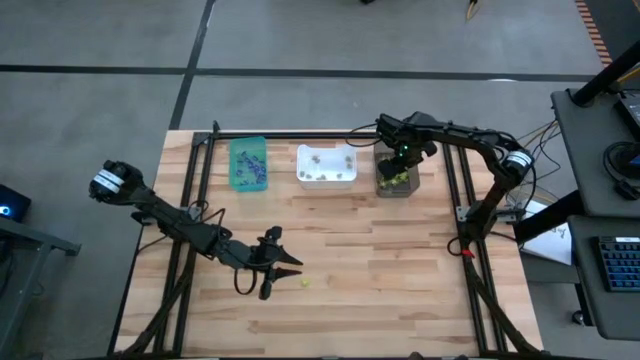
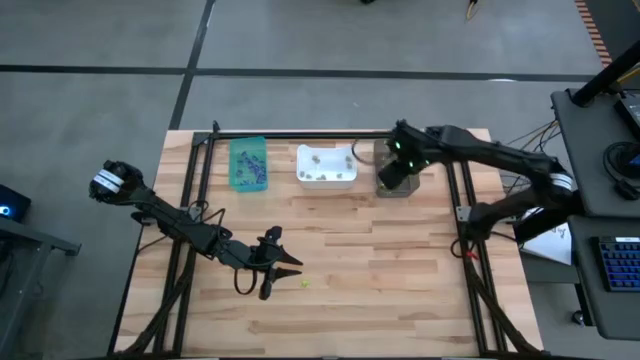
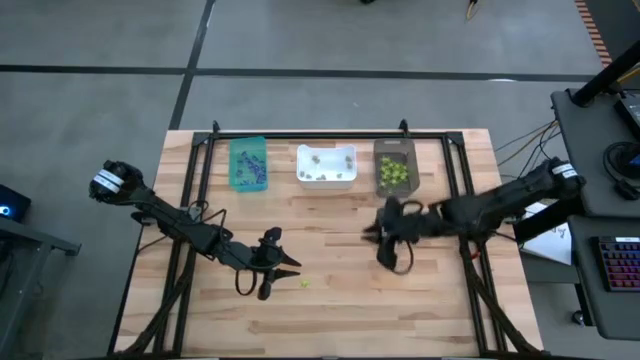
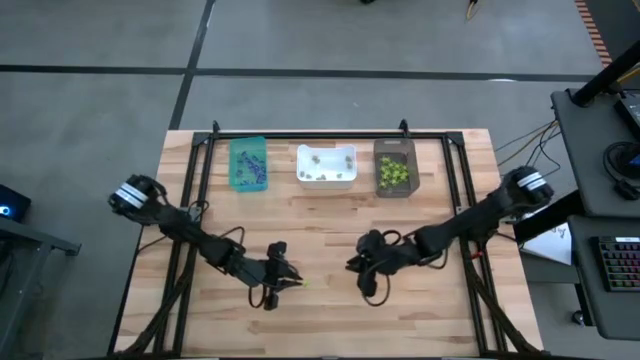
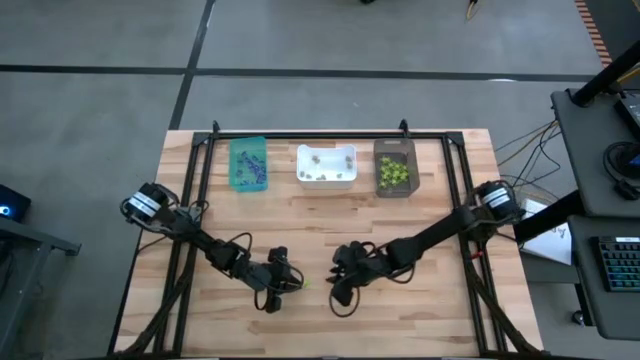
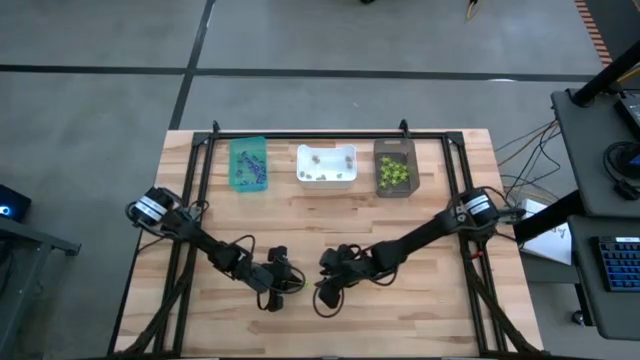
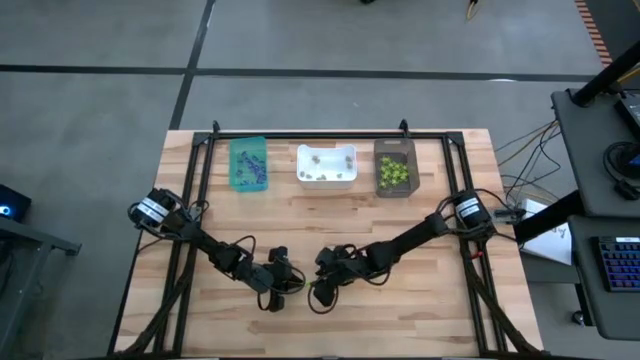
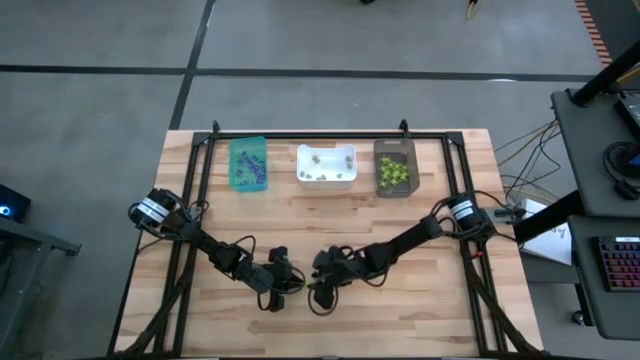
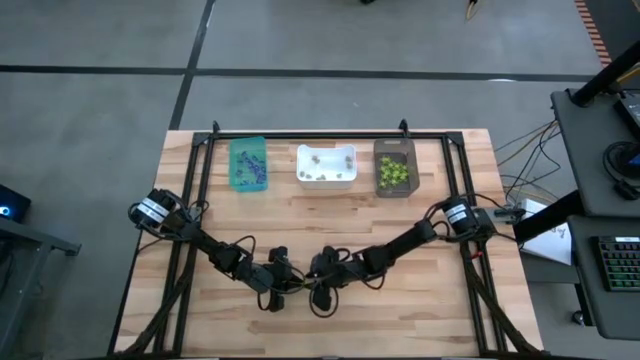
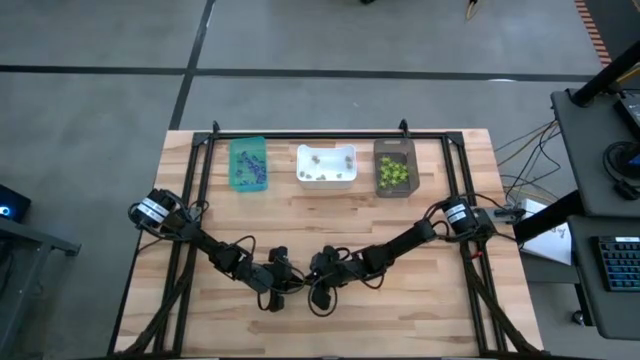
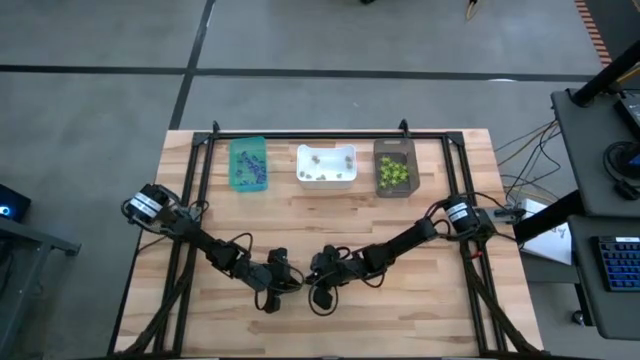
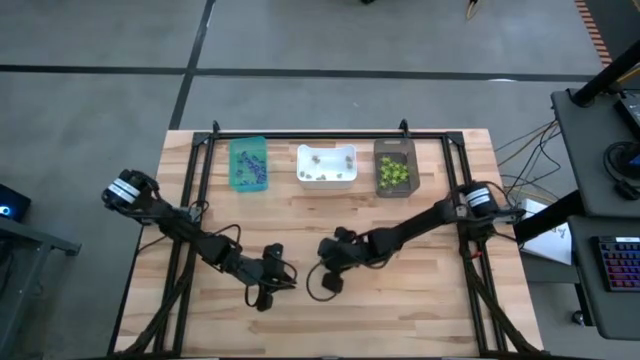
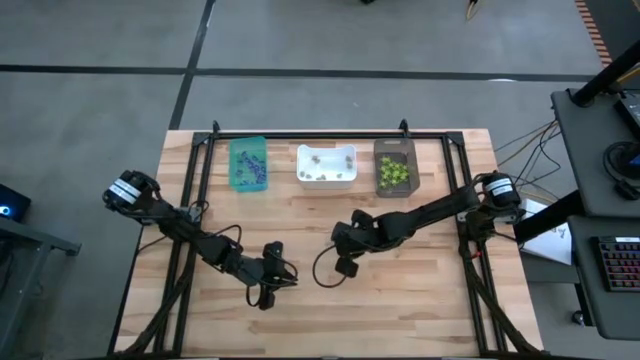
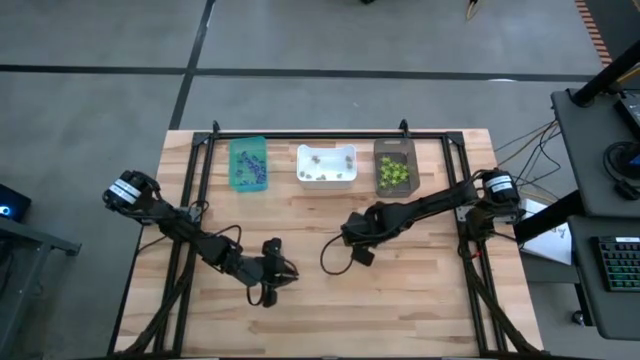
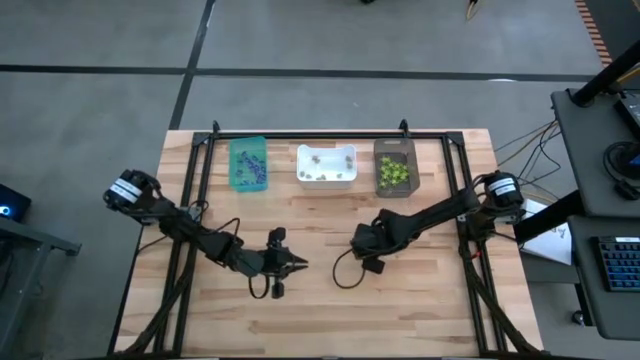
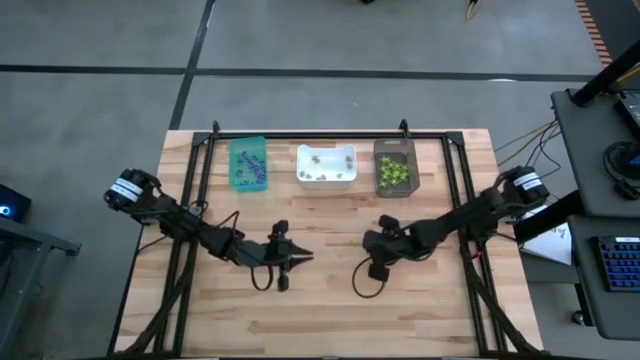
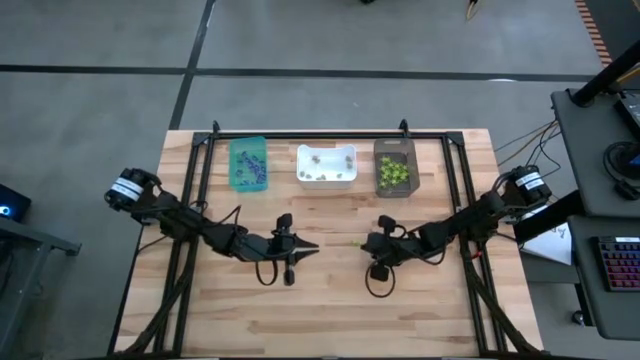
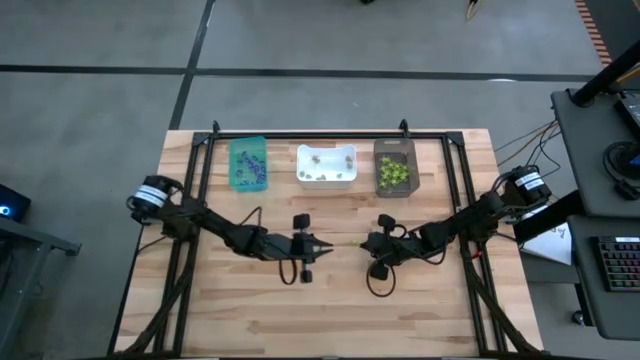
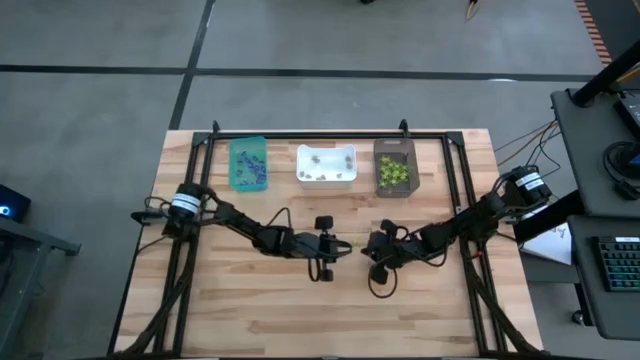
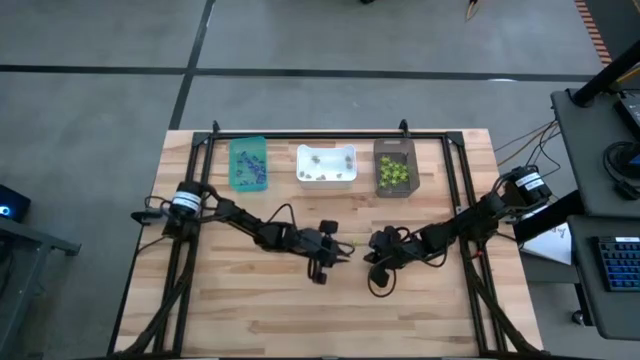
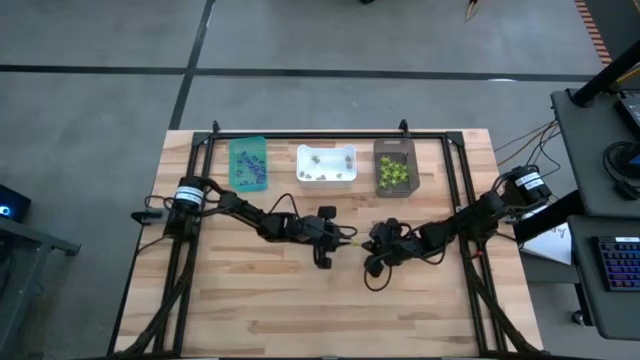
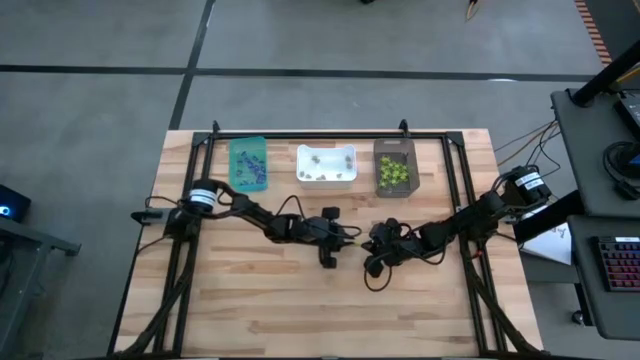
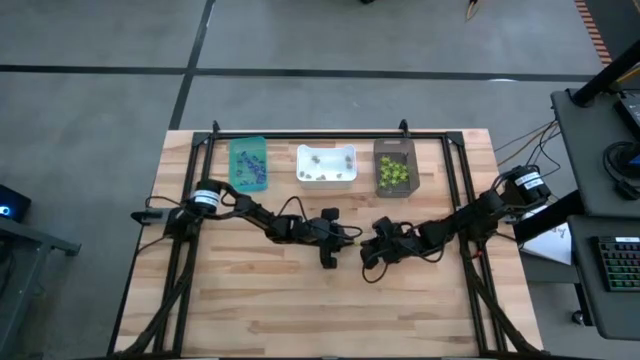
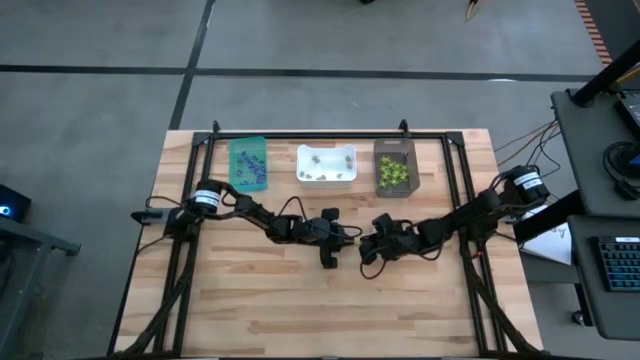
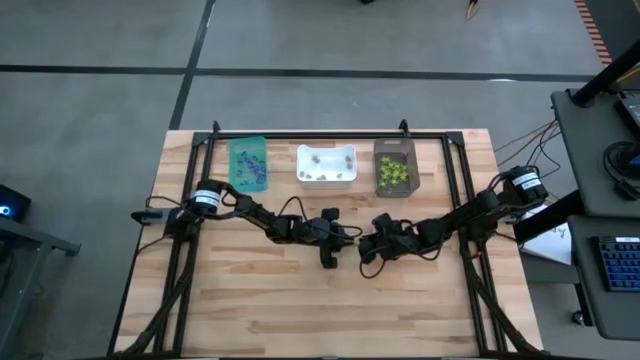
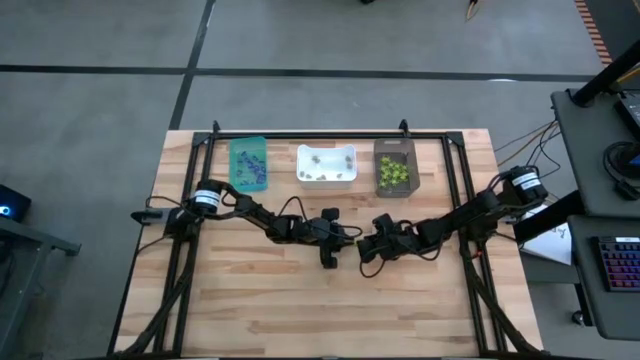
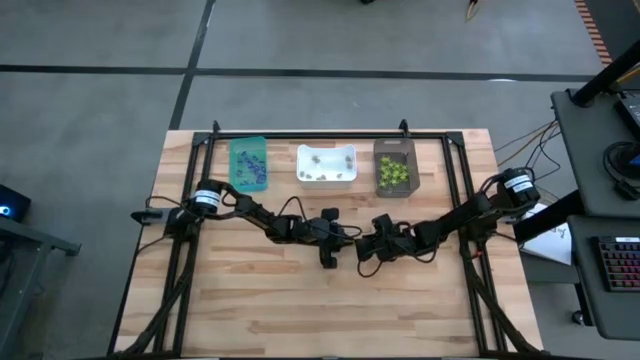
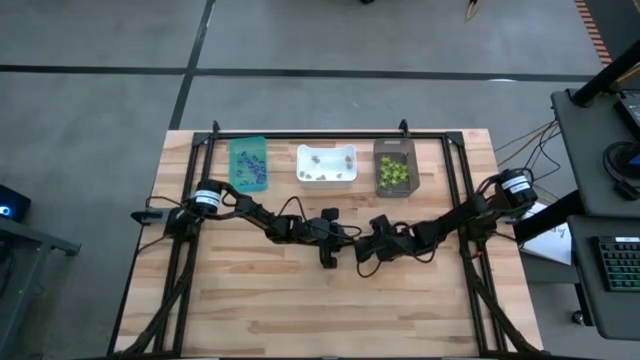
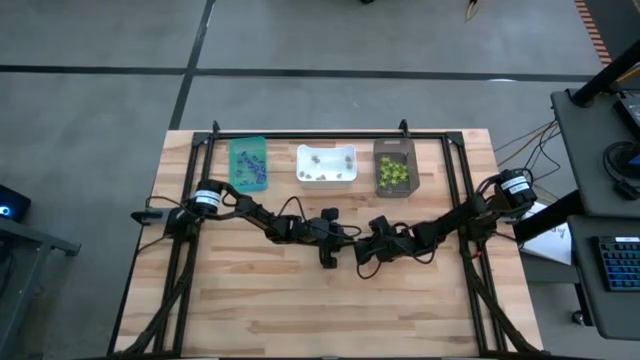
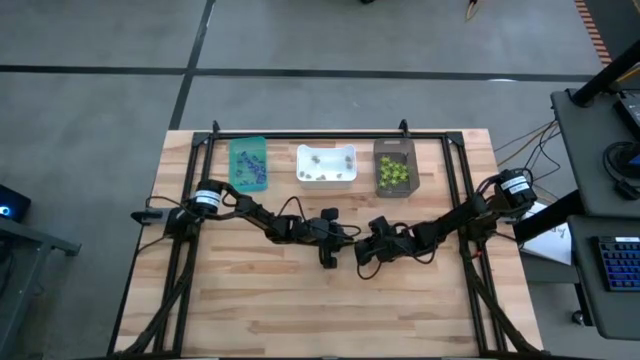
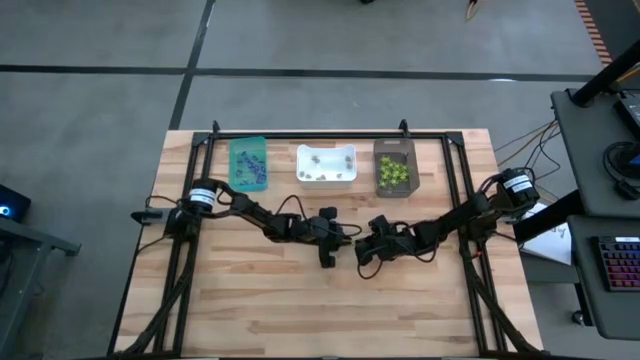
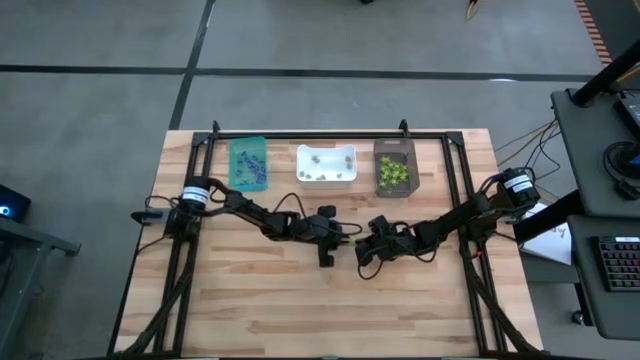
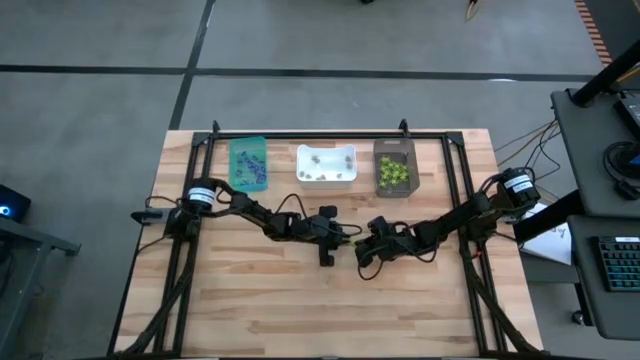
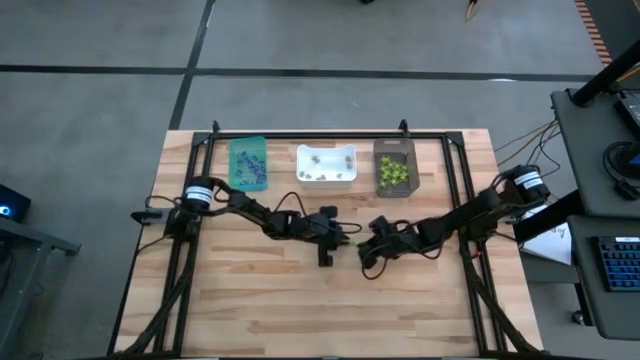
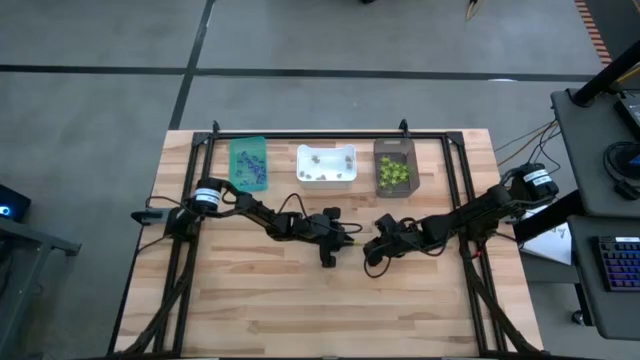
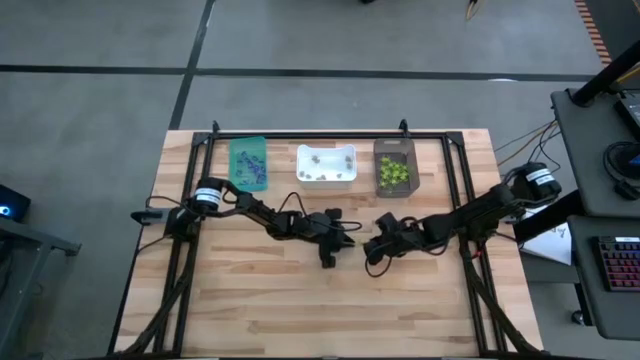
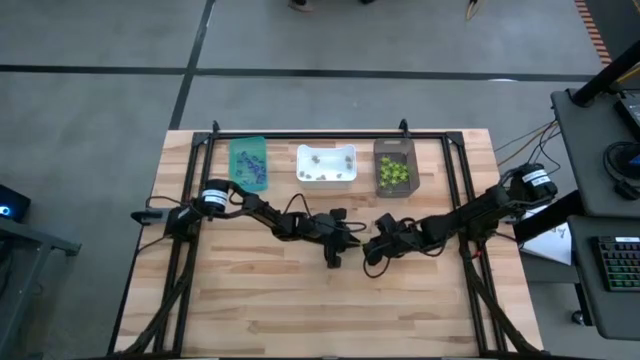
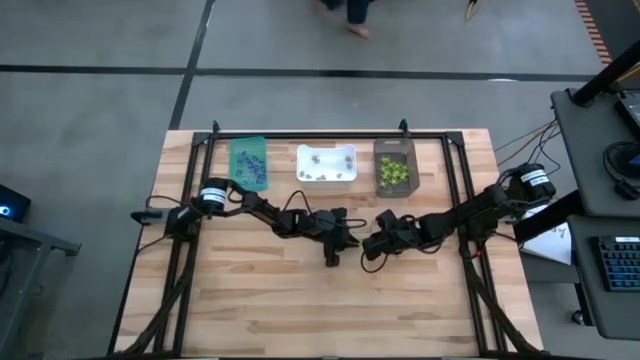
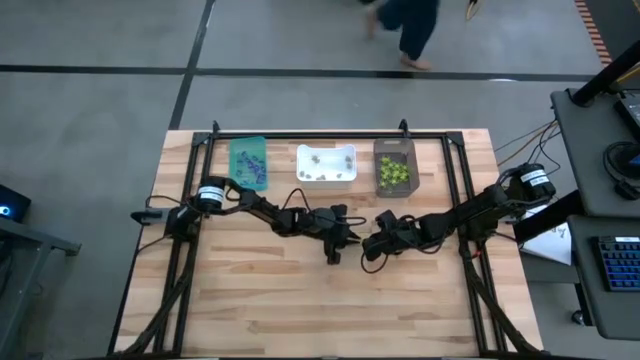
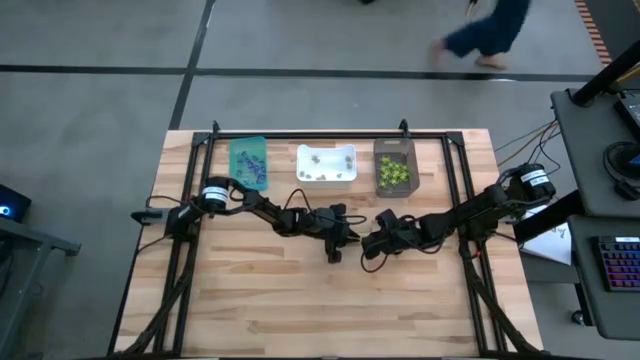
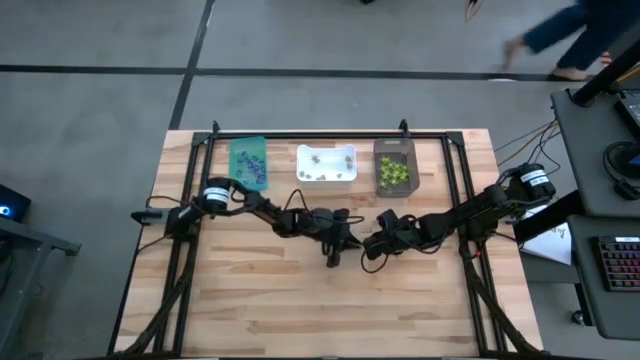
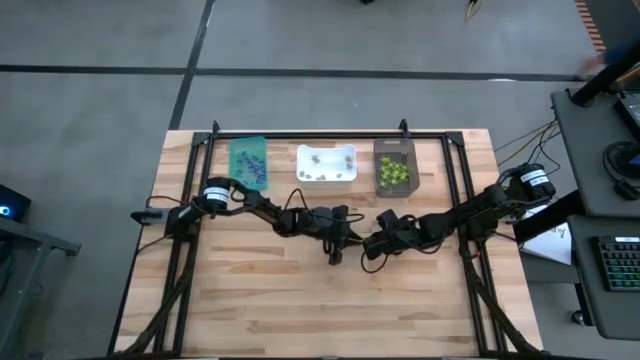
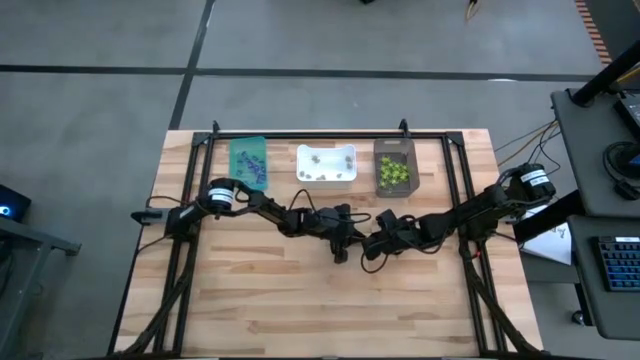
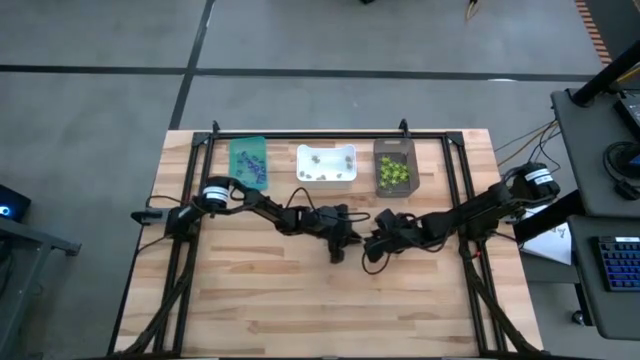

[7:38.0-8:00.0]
Task: Sort Halloween decoration
Put the green spider toy into the black bin
